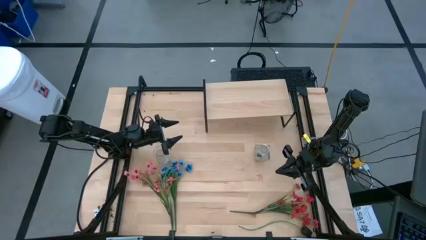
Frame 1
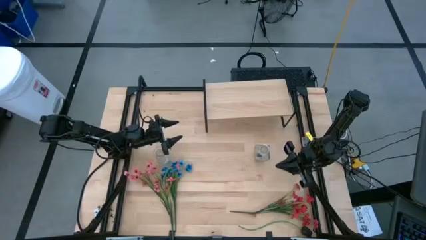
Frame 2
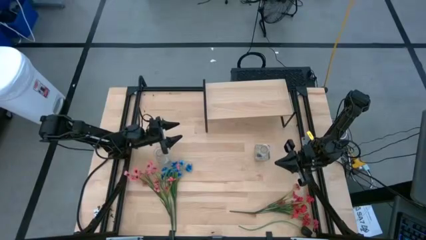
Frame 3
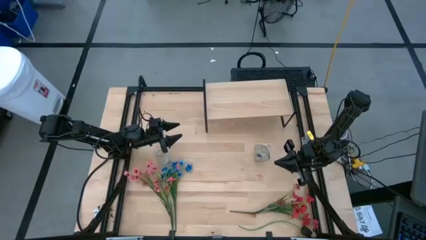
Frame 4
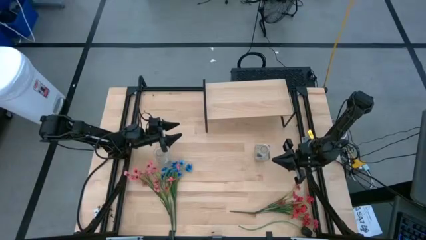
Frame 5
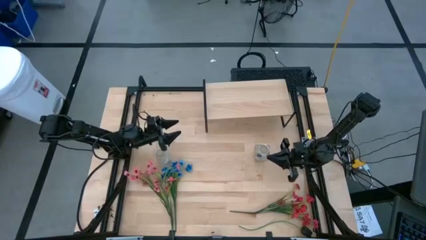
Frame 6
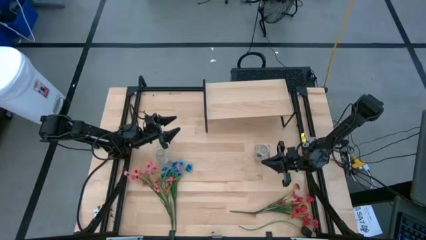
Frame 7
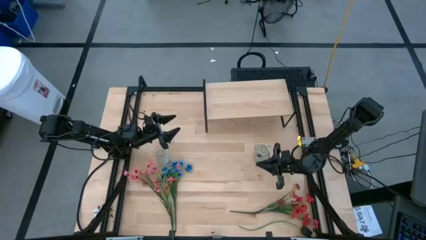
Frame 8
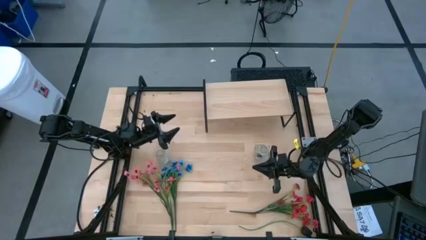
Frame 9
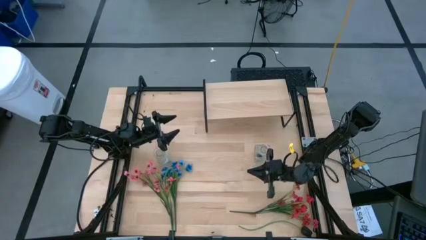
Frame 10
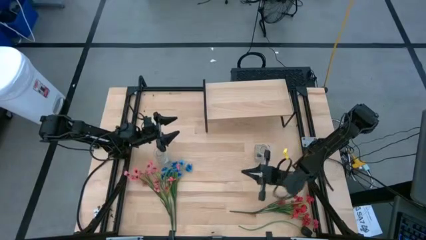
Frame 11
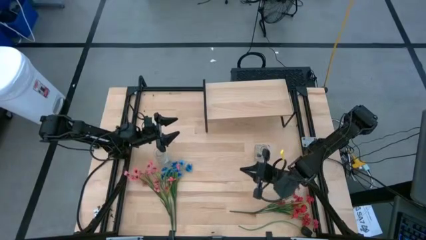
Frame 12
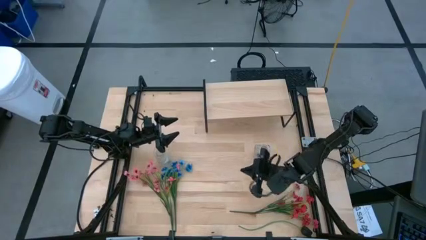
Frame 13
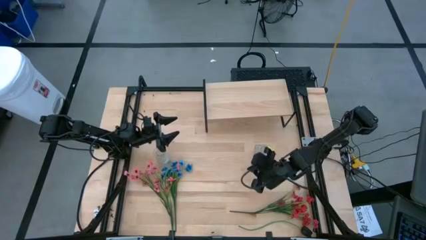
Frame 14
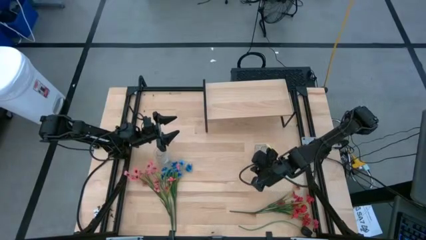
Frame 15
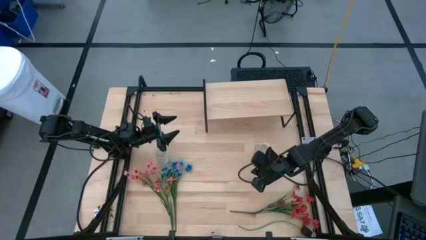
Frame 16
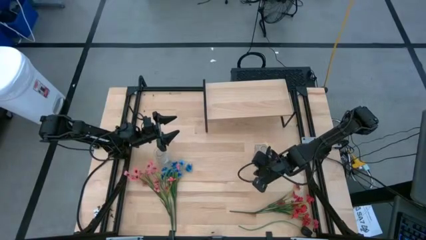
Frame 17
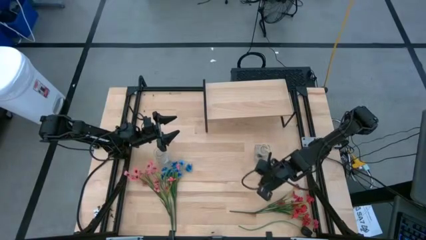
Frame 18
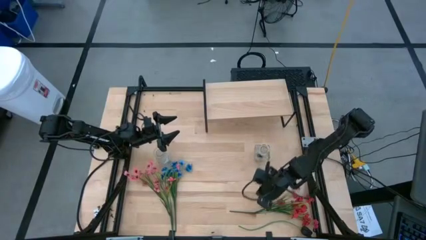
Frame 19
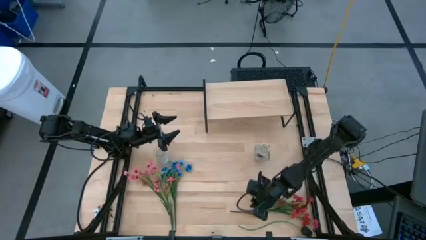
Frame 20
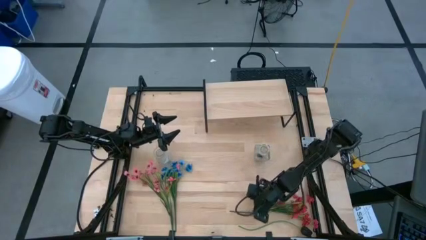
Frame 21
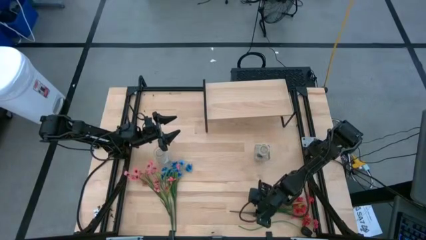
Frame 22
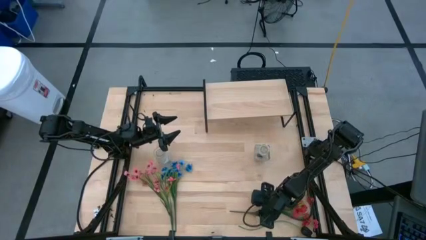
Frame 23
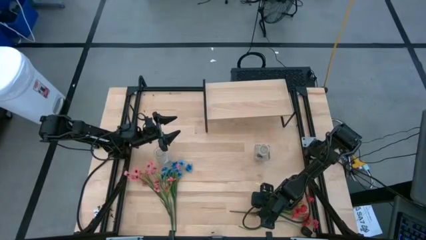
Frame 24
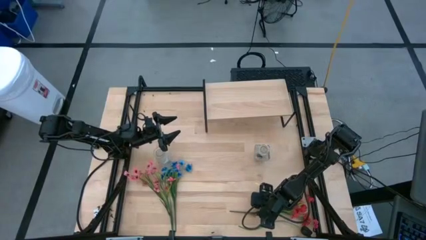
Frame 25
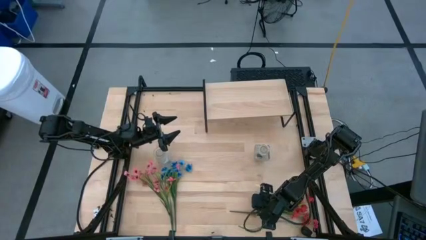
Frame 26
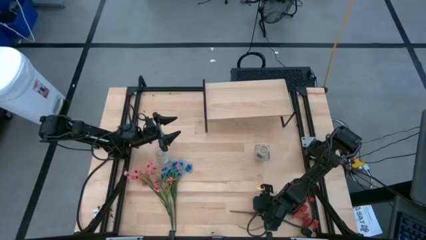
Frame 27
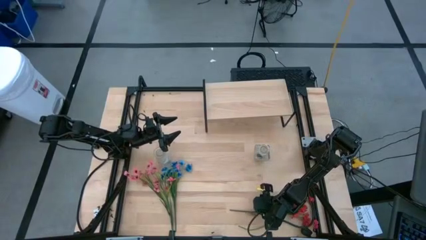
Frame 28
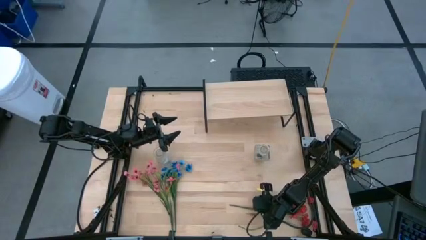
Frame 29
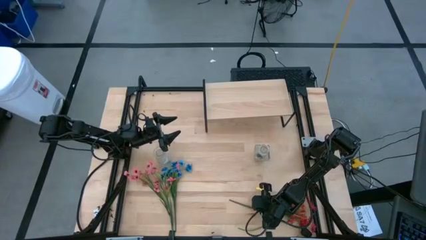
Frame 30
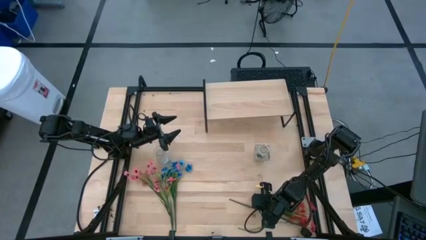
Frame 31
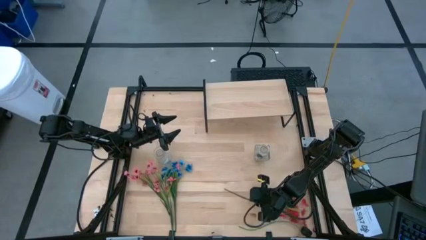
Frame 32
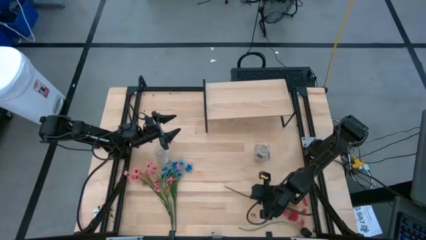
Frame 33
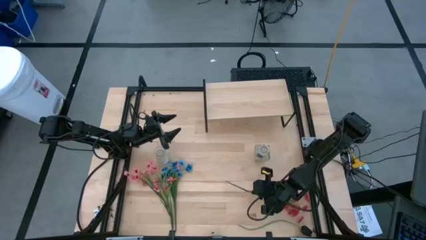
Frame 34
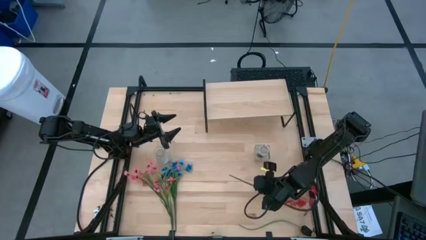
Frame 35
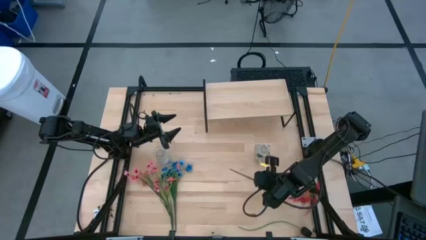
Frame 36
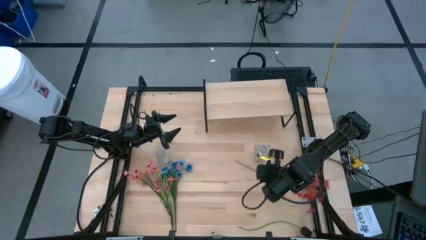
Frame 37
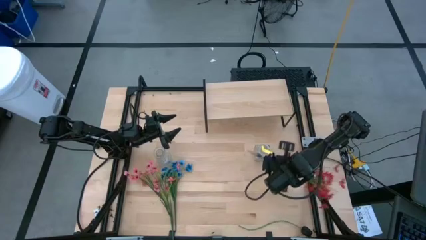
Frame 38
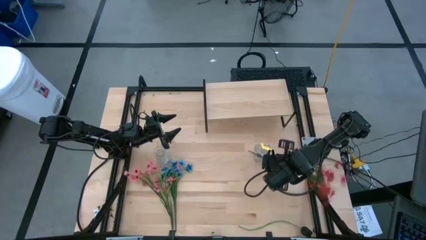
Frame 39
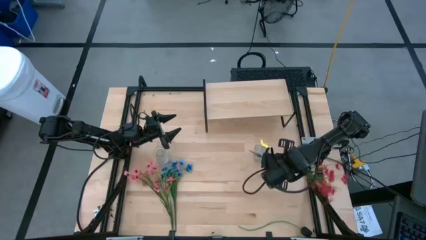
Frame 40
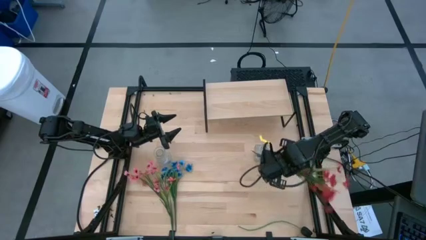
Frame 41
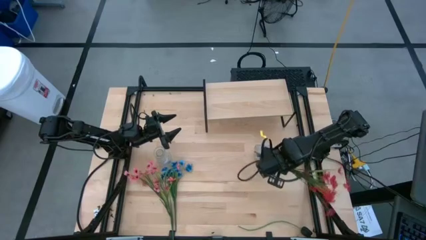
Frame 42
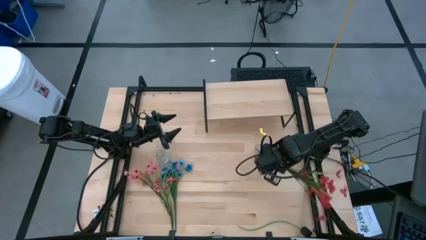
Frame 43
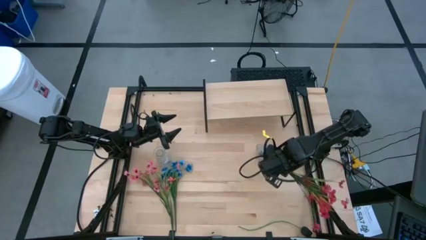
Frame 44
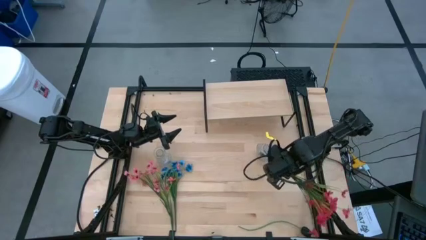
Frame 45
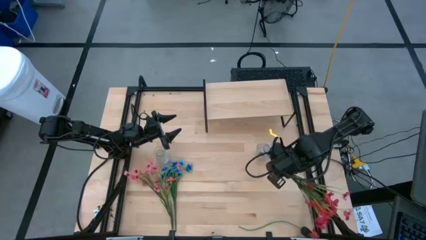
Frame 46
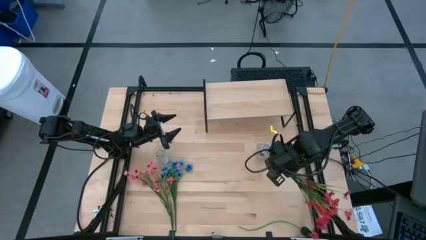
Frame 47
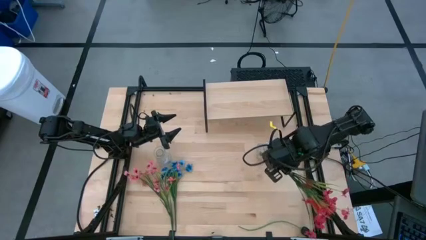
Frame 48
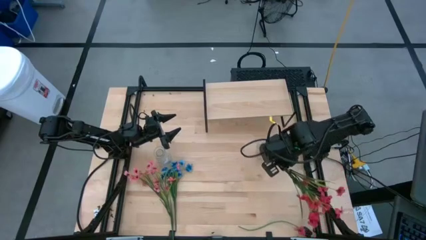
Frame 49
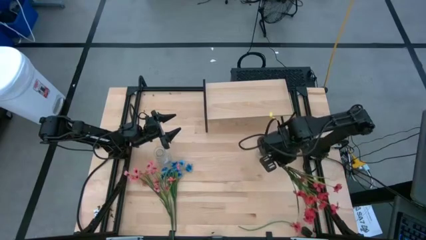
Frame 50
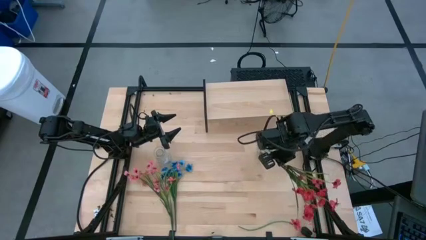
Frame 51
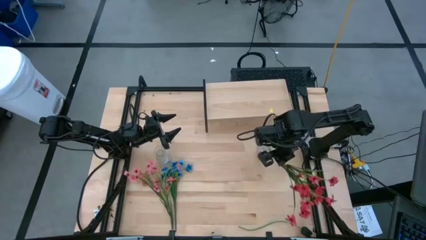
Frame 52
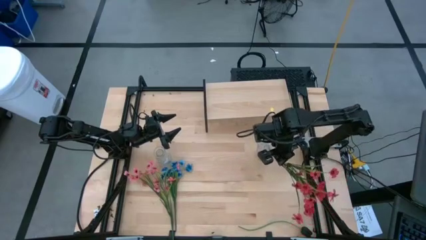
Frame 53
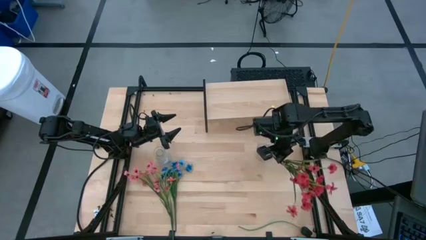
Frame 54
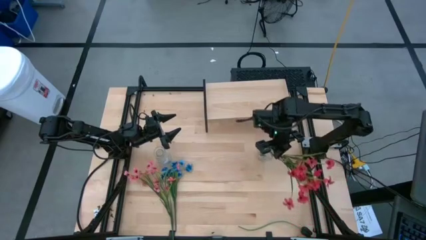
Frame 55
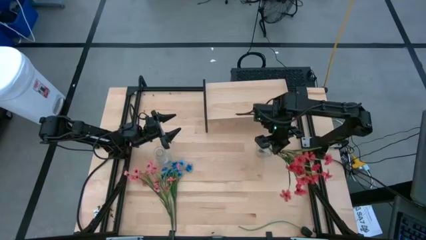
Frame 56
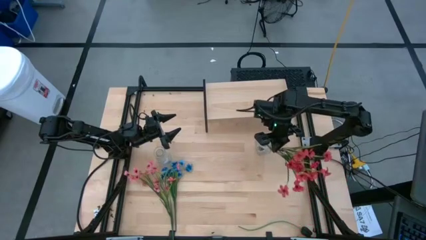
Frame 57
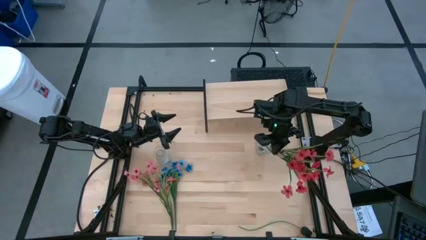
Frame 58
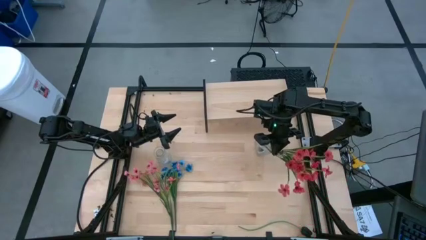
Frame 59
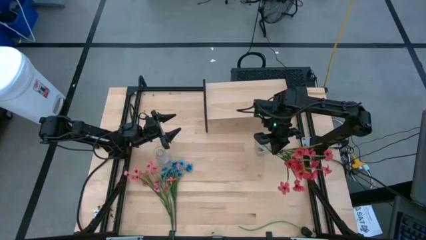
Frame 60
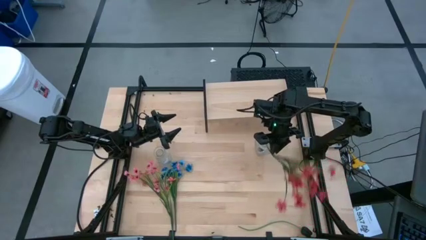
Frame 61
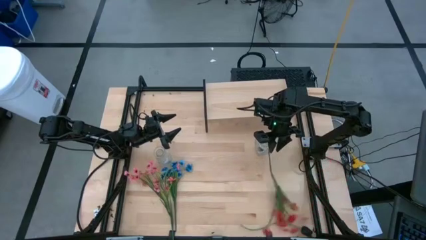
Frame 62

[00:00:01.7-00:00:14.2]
Task: Pick and place flowers into a vace then onto a shelf
Put the red flowers into the right transparent vase
